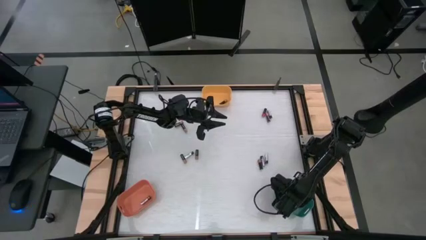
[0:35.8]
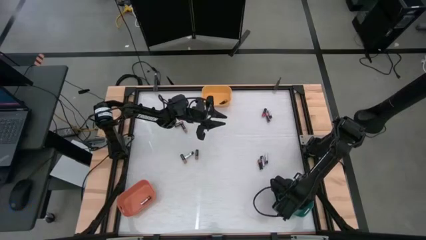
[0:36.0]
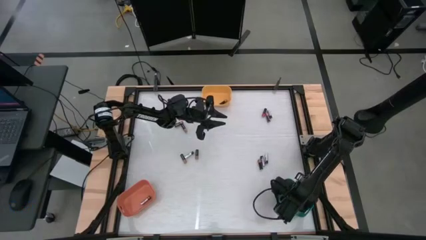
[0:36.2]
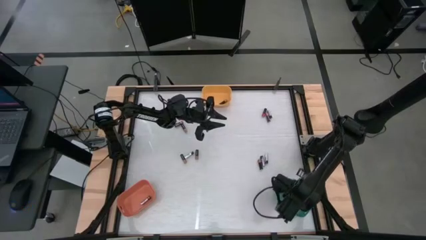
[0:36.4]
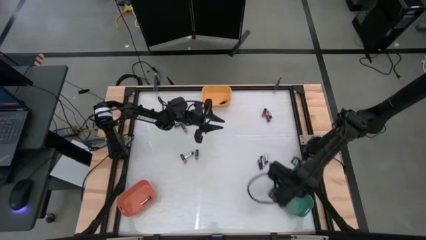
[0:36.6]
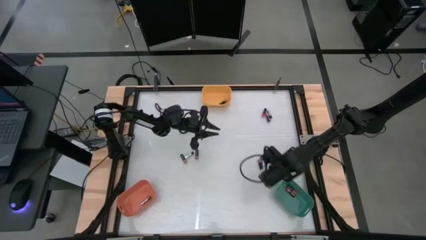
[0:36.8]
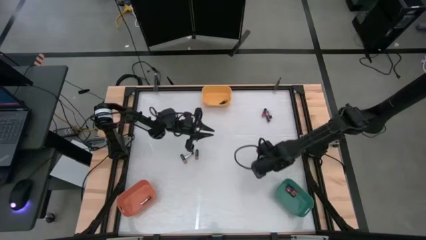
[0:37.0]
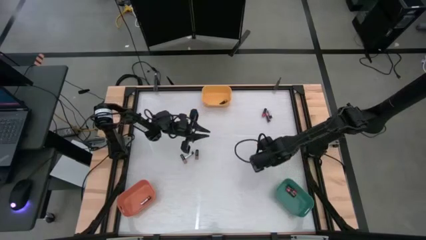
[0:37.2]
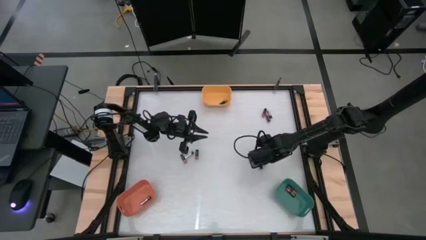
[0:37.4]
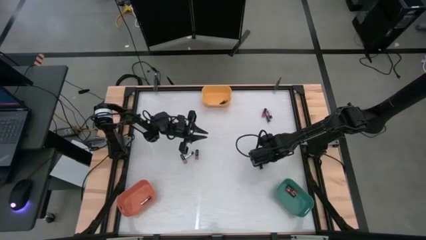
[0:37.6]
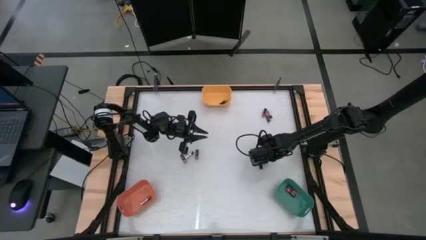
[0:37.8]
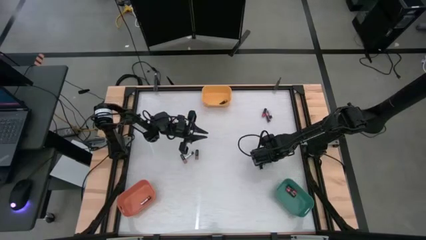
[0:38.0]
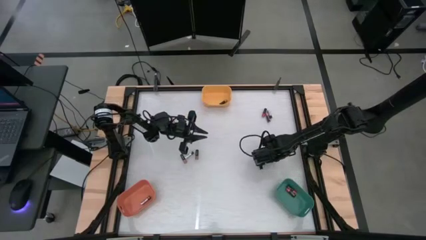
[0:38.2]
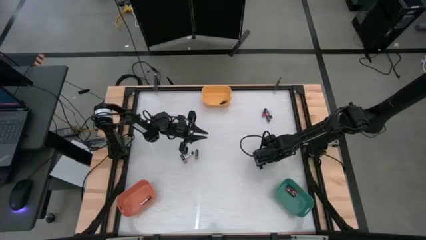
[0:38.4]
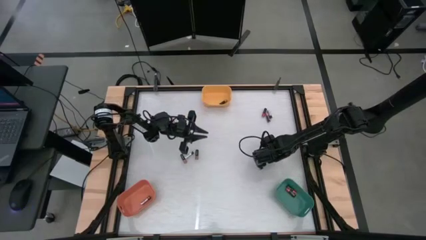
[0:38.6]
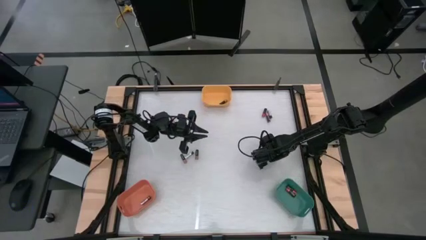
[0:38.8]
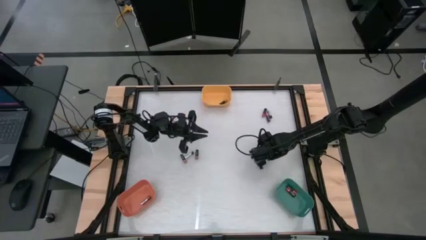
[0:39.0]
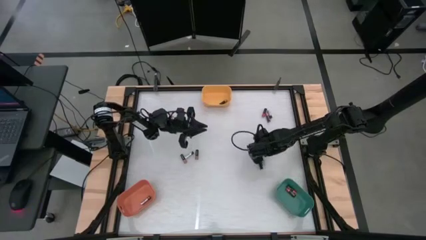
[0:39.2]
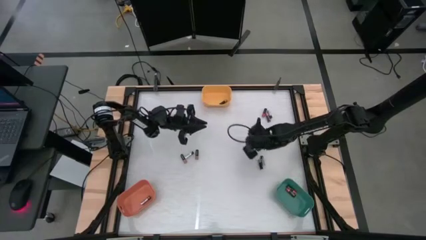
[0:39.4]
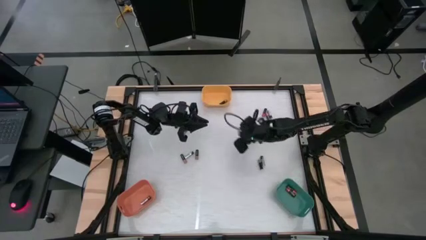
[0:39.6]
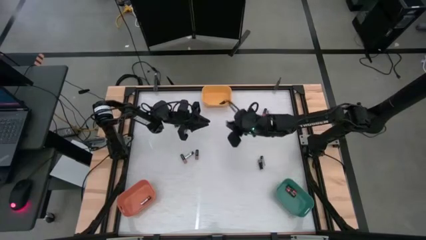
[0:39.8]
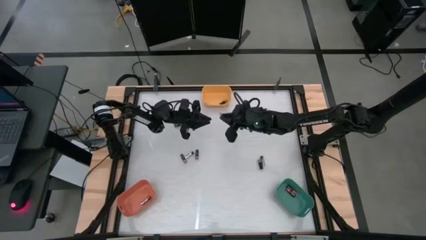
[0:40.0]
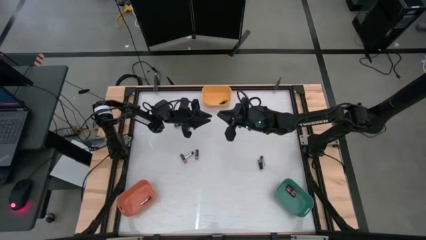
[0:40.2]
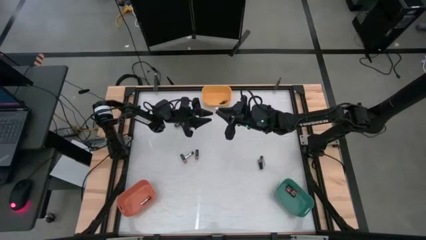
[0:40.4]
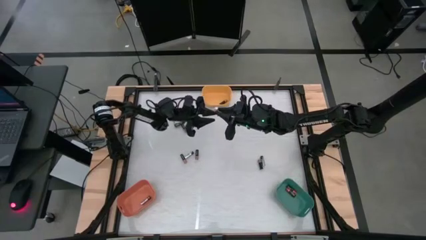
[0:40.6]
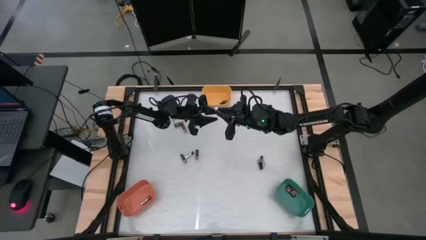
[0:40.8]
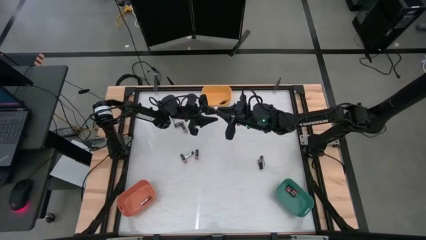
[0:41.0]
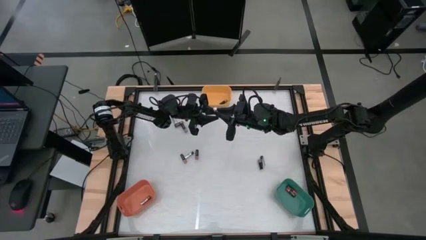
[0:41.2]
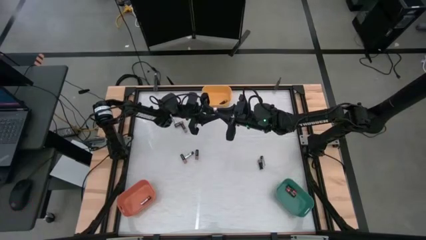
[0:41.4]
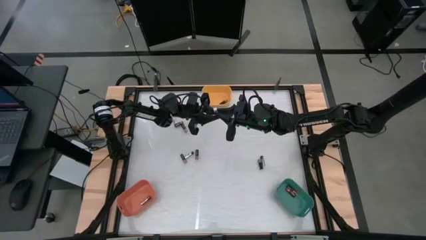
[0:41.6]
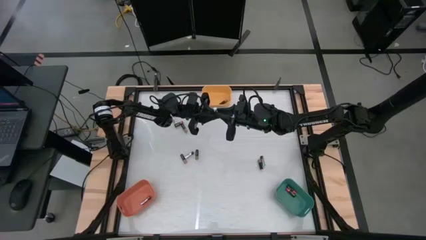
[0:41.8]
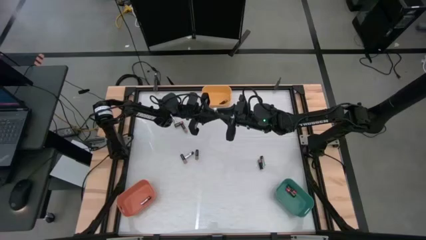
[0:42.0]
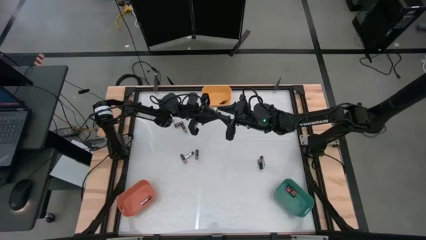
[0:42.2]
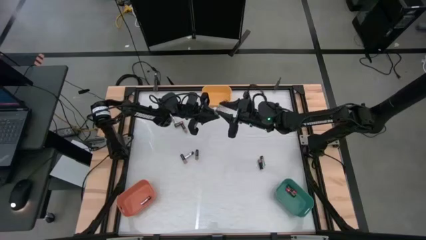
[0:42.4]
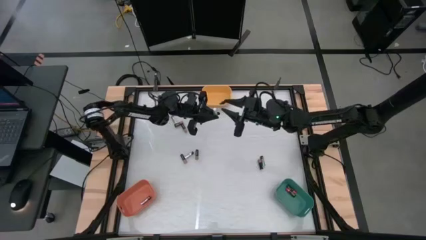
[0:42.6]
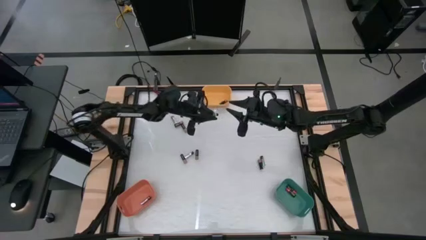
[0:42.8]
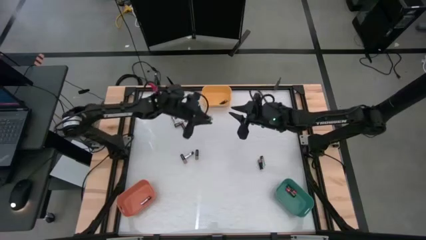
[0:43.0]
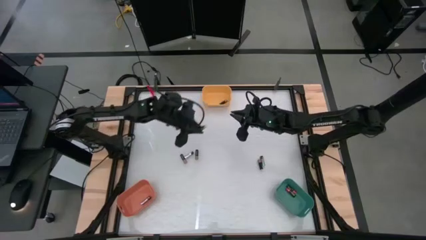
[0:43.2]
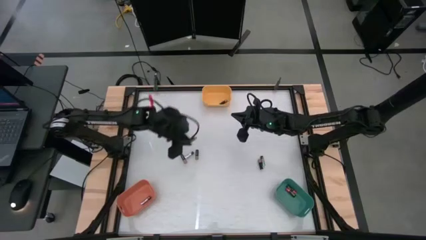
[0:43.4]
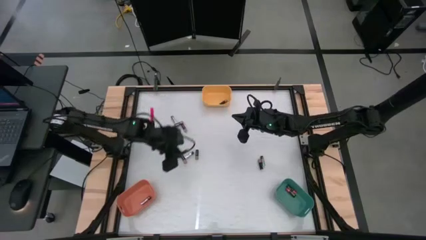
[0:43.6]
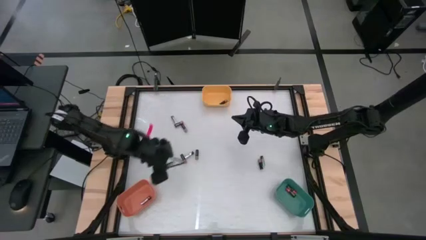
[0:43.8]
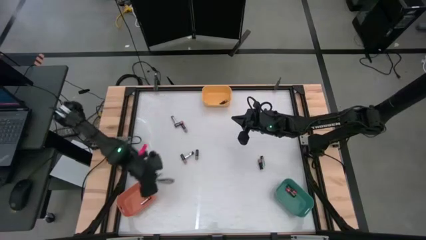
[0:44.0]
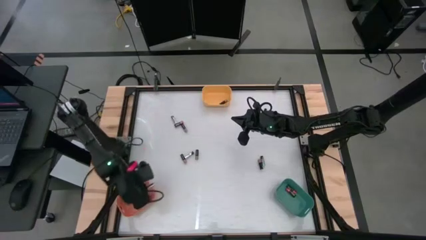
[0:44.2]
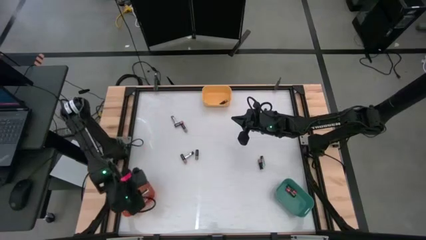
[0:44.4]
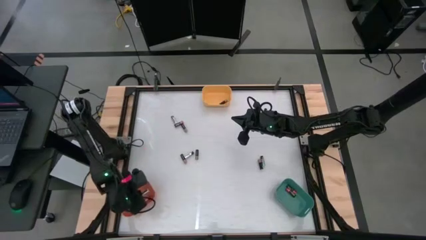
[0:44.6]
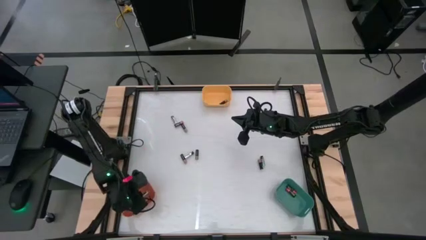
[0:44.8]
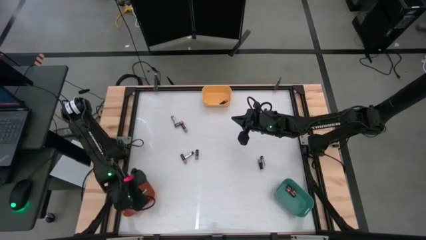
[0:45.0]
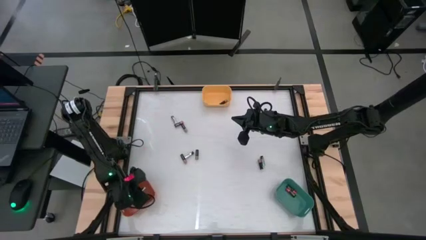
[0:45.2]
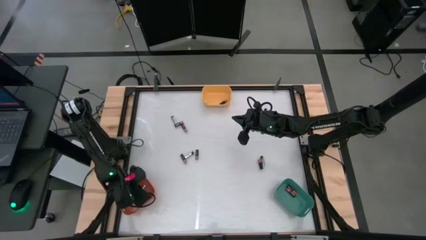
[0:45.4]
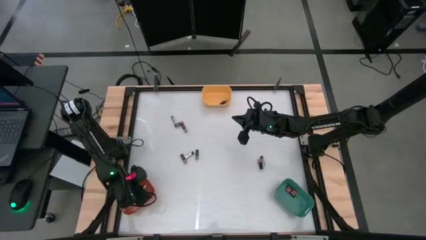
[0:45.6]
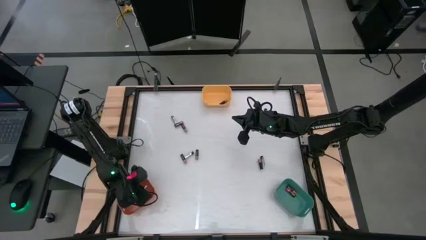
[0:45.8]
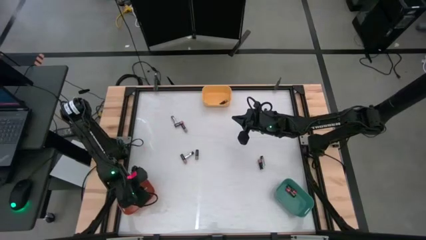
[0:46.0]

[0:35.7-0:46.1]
Task: Sort batteries
Put the right silver battery into the orange bin

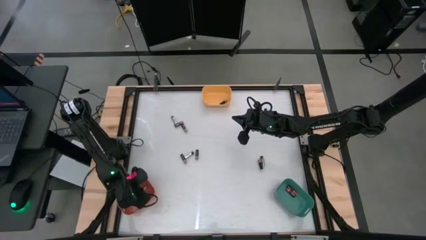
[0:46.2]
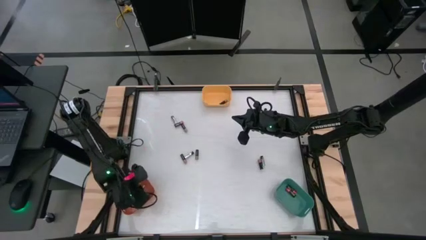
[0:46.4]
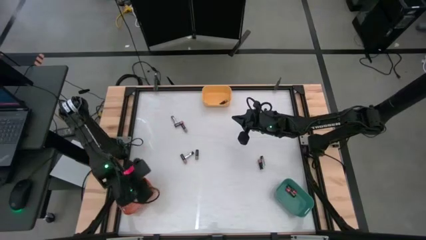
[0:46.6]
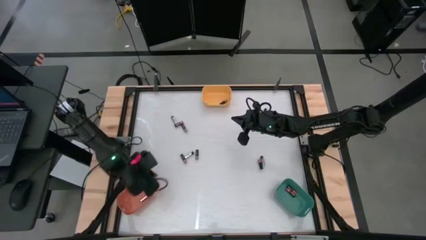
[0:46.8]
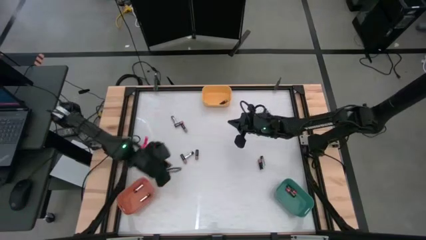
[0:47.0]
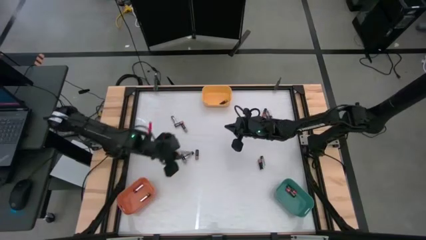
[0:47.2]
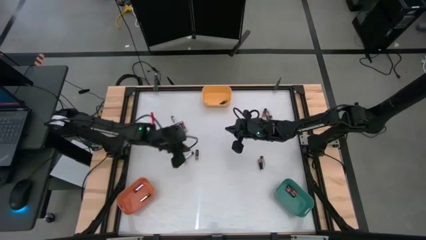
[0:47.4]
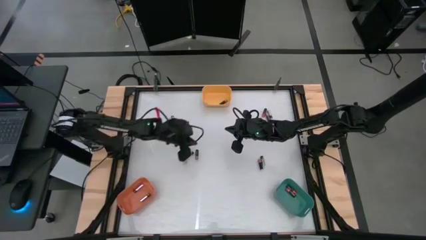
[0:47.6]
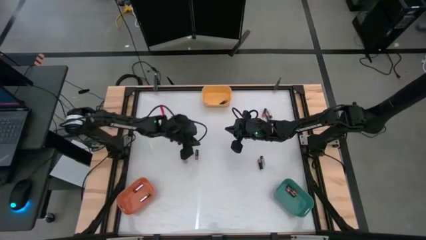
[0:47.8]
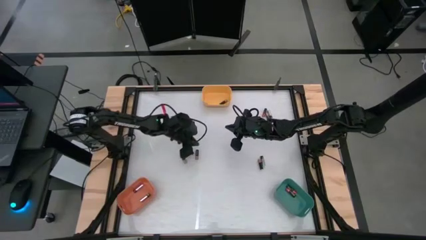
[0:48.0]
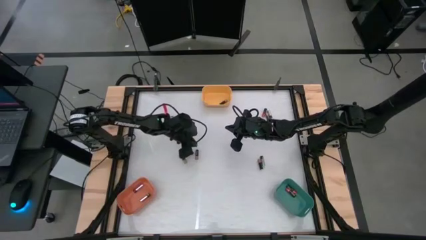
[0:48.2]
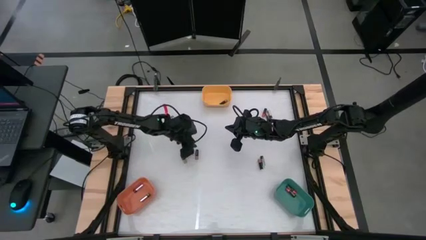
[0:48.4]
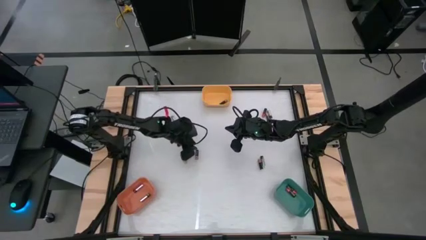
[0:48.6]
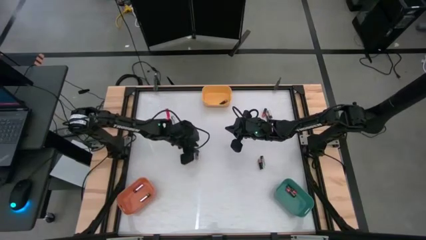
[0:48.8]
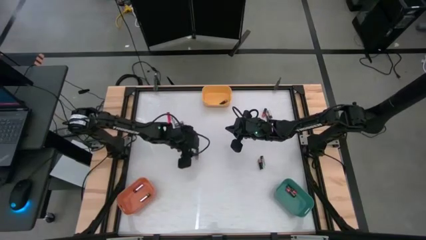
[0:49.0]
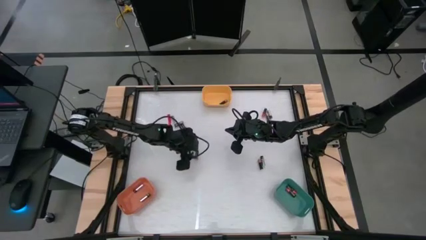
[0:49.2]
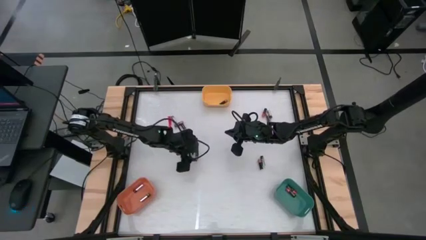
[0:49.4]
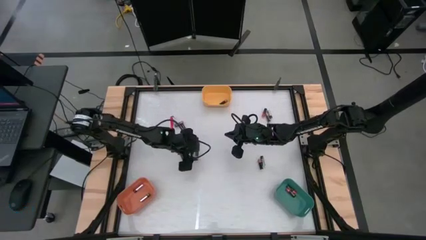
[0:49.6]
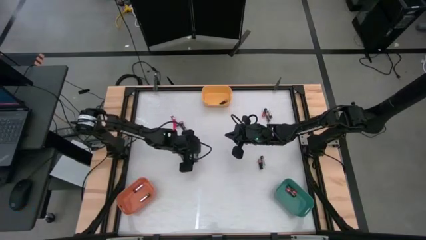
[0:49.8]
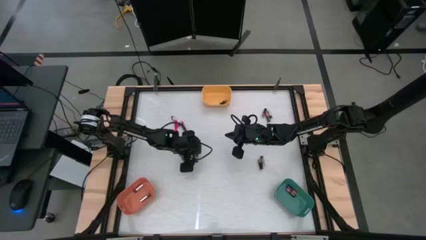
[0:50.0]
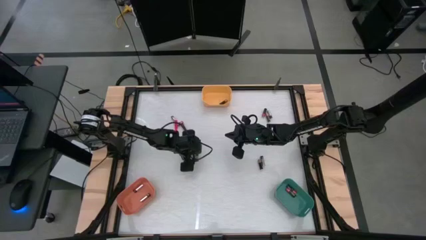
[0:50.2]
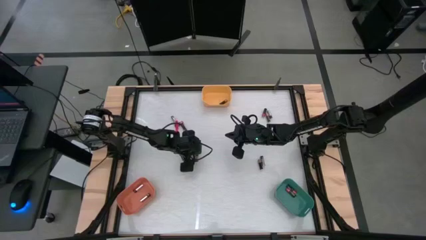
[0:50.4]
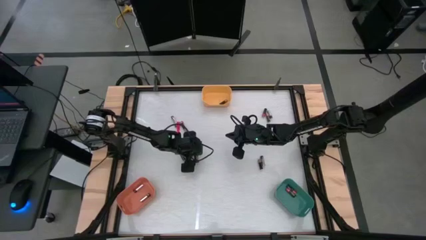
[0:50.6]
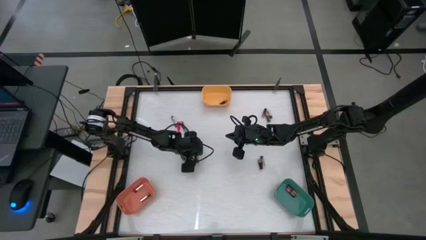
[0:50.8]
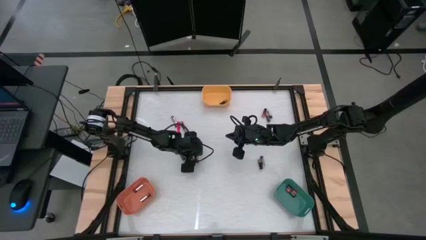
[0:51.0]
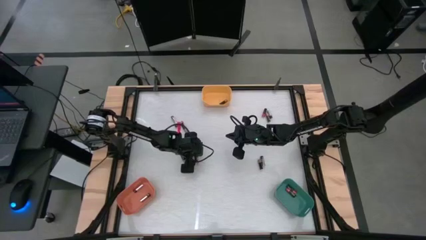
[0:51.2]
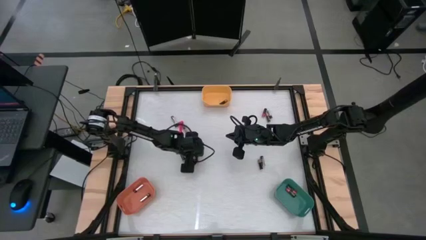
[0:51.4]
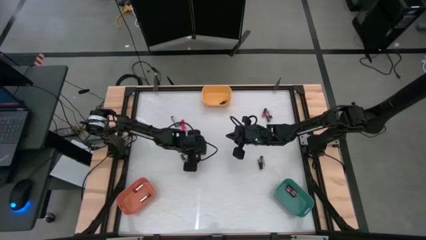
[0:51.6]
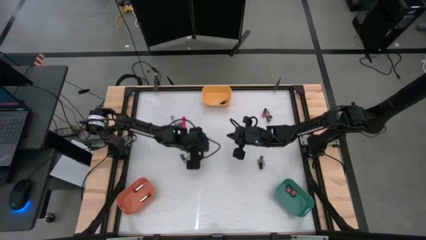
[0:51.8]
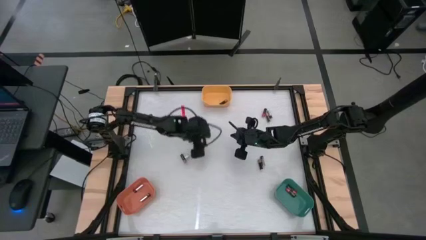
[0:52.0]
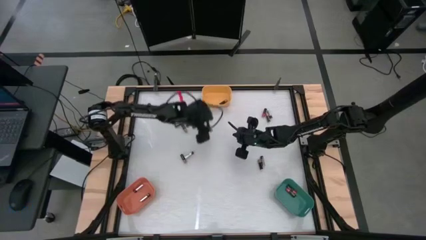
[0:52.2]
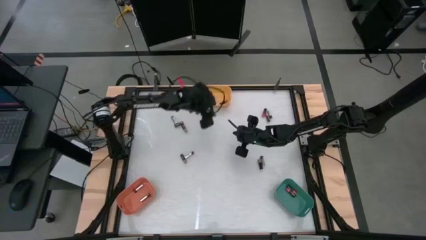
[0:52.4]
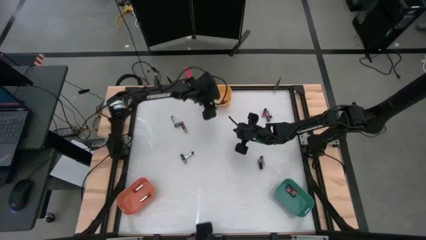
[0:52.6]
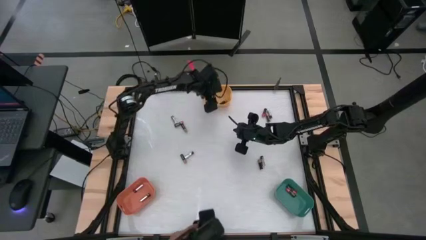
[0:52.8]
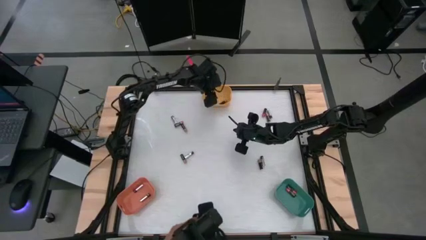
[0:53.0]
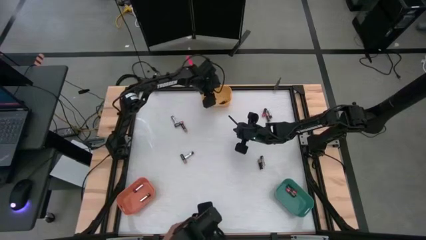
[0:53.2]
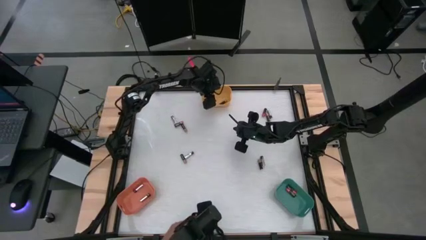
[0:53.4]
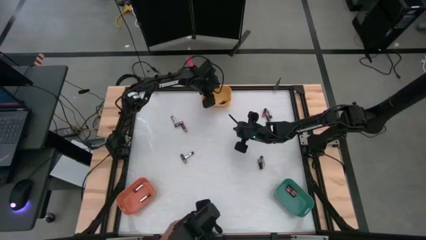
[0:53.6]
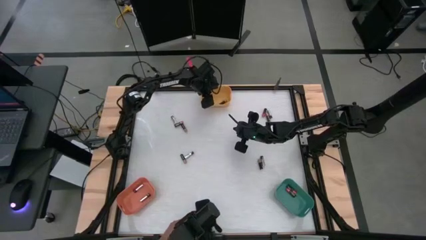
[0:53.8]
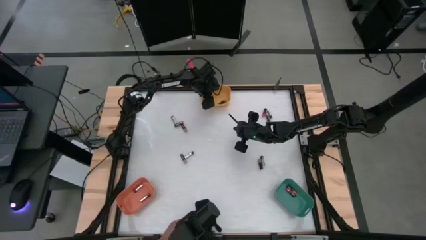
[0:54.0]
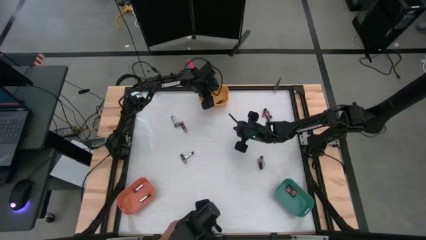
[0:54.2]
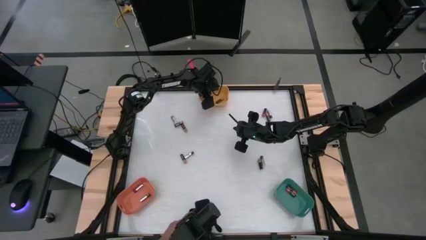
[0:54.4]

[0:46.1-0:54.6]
Put the black-brown battery into the yellow bin
